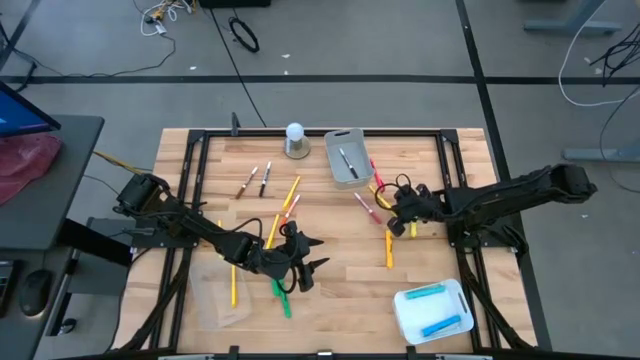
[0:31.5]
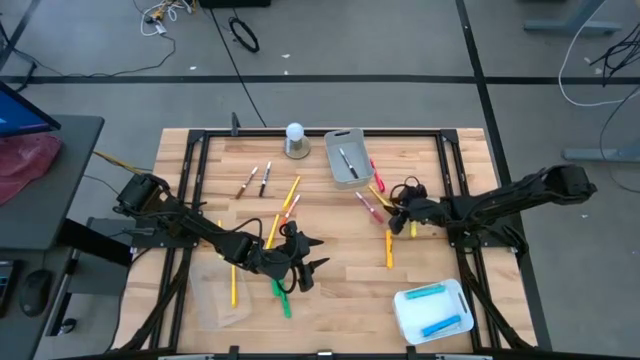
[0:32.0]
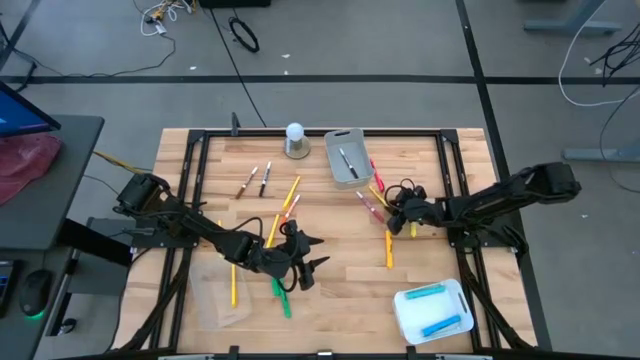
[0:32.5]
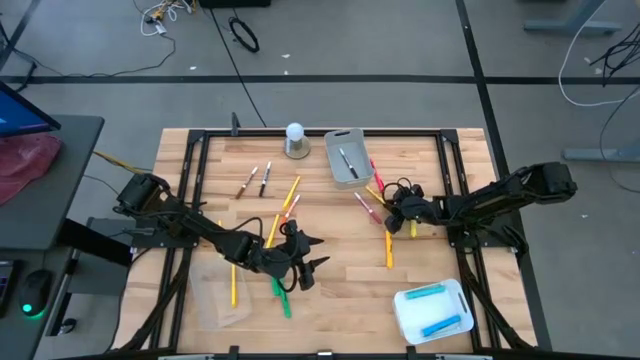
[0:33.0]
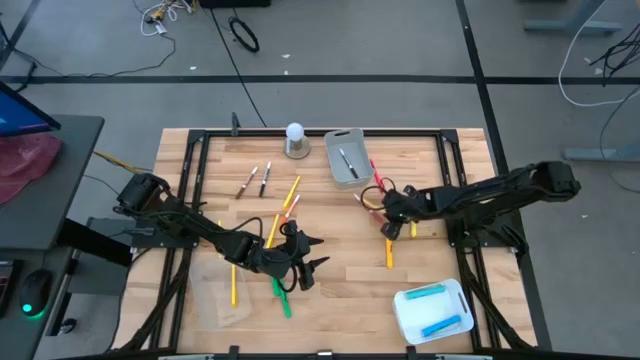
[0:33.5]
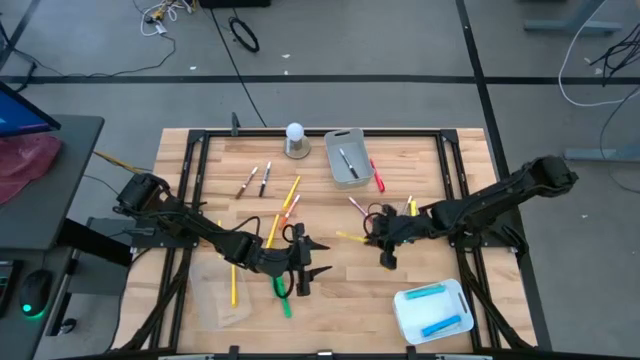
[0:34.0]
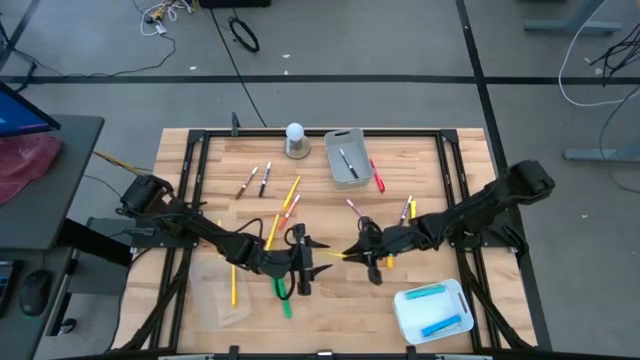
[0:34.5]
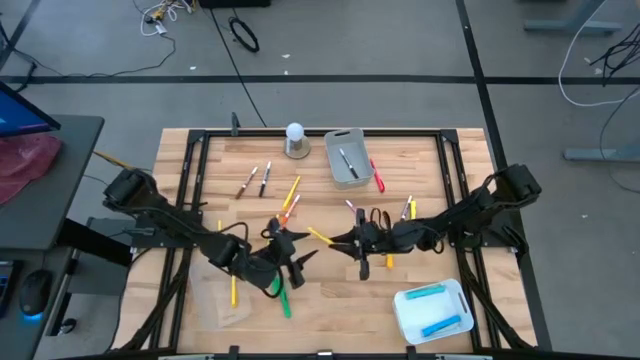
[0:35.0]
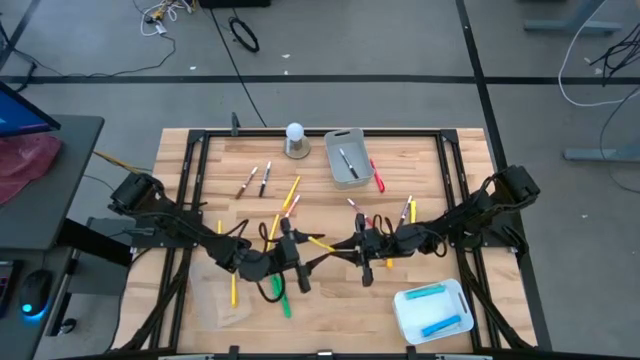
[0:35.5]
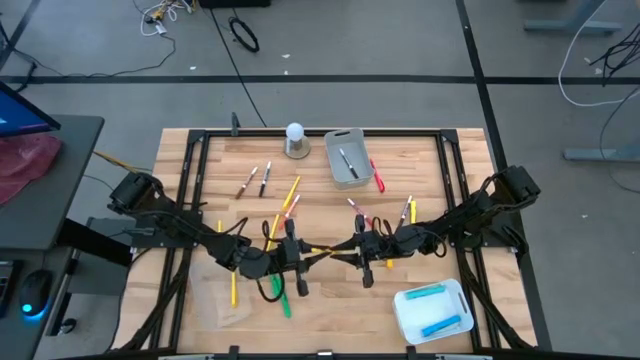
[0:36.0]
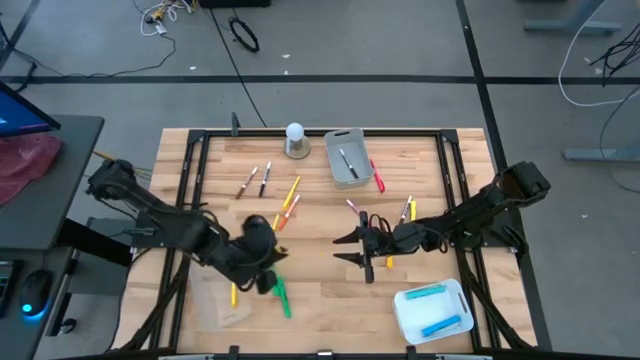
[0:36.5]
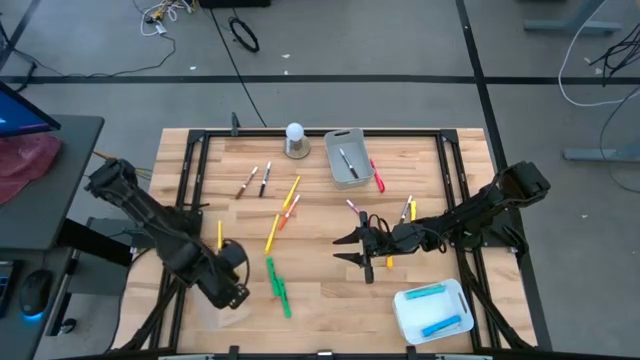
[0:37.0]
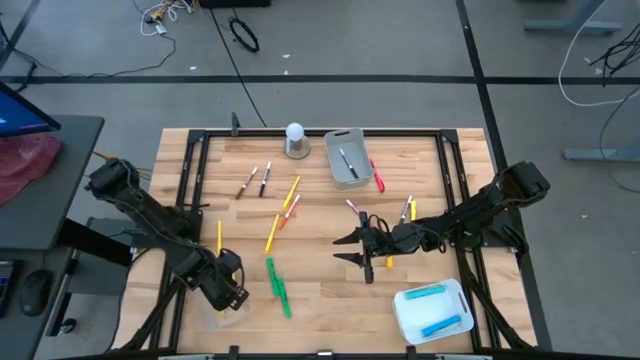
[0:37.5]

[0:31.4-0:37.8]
Task: Pick & Place Markers
Put the yellow pen into the transparent bin

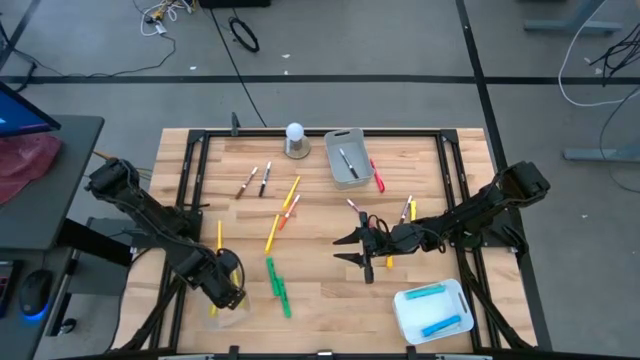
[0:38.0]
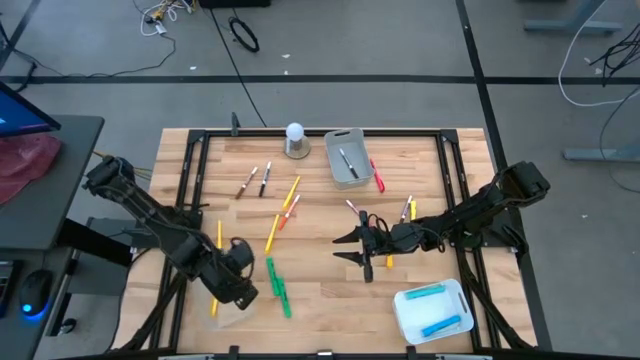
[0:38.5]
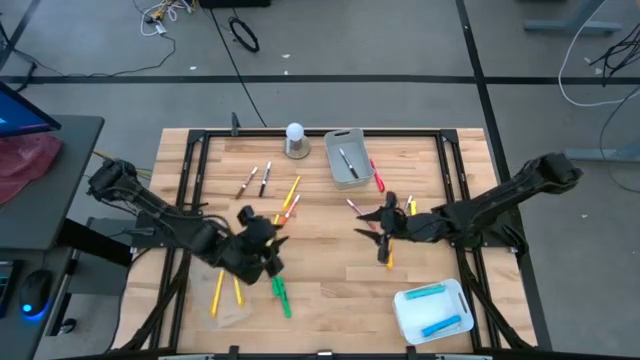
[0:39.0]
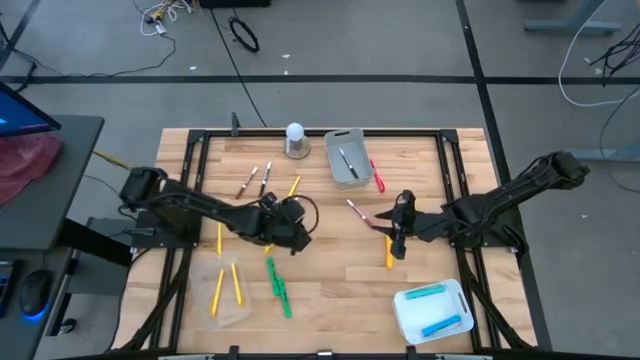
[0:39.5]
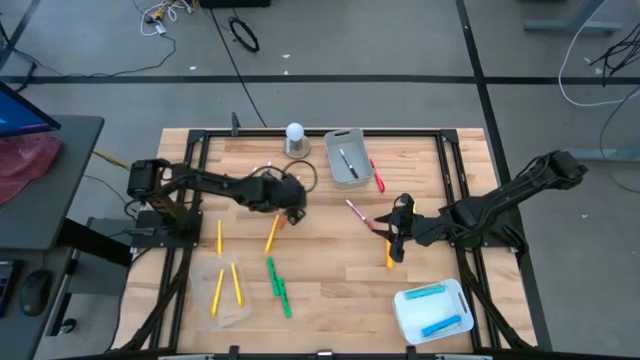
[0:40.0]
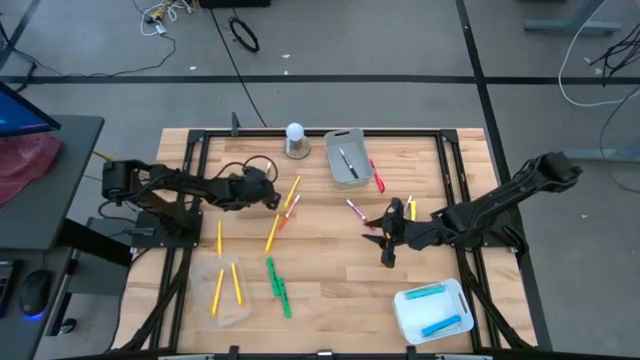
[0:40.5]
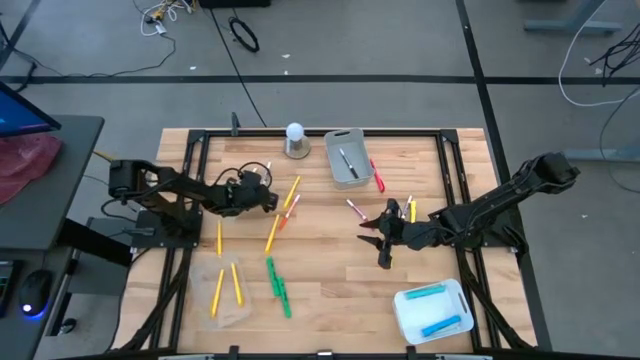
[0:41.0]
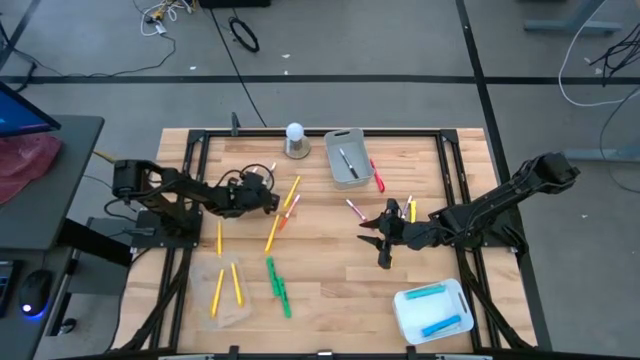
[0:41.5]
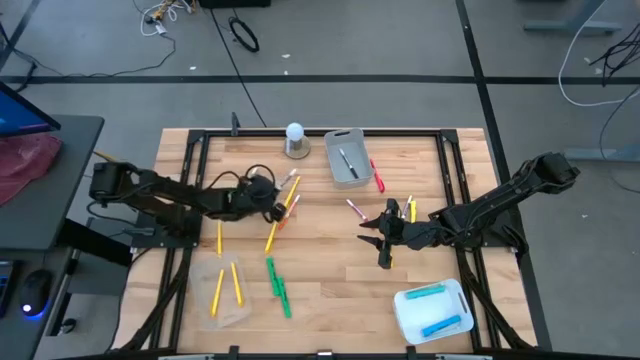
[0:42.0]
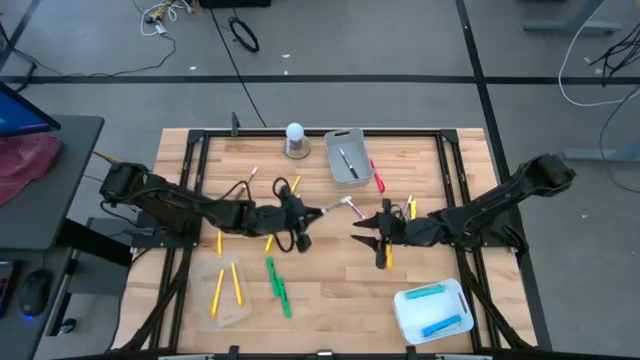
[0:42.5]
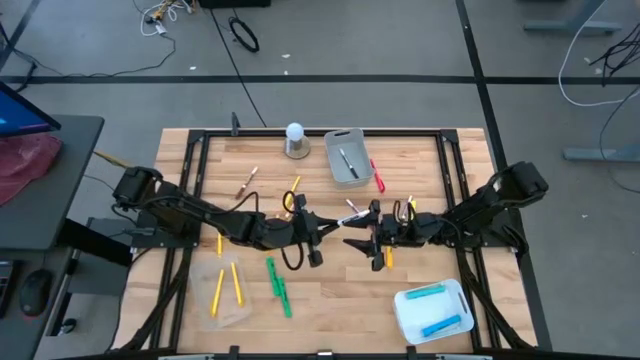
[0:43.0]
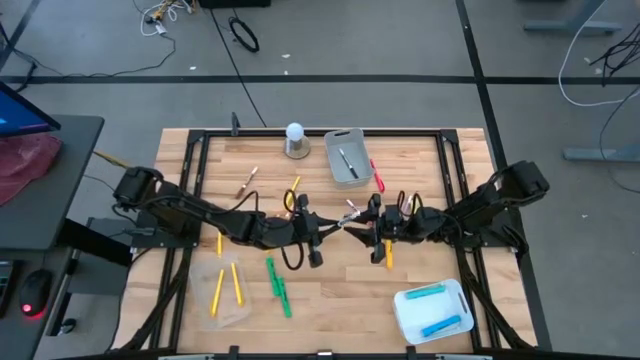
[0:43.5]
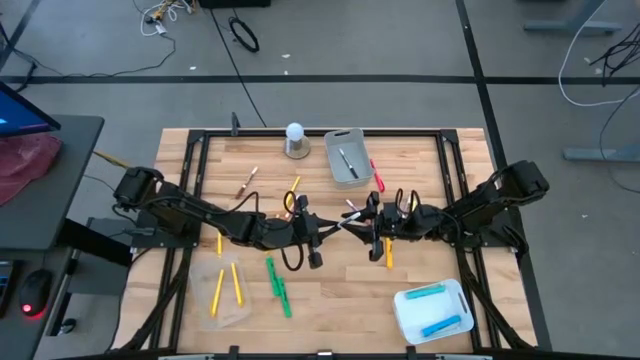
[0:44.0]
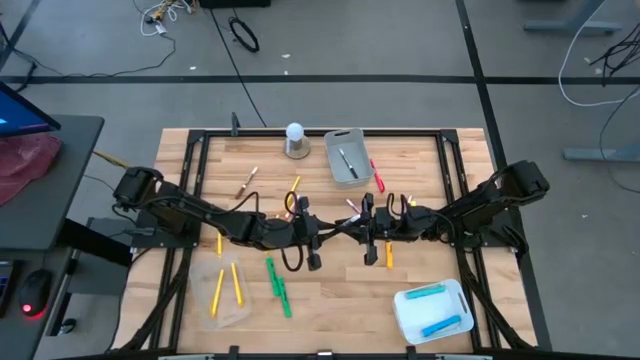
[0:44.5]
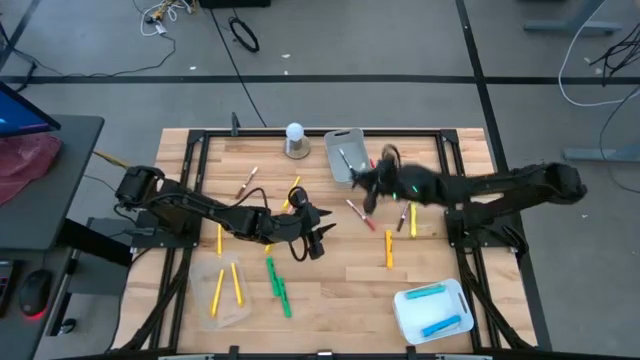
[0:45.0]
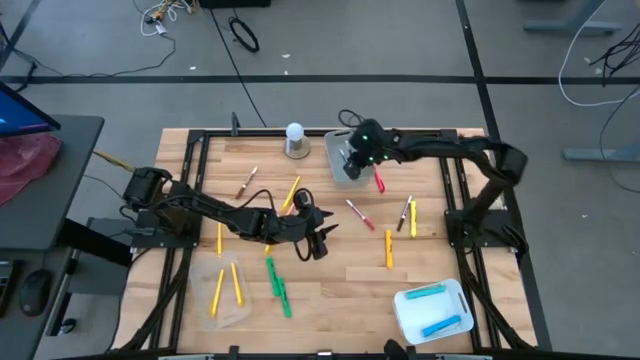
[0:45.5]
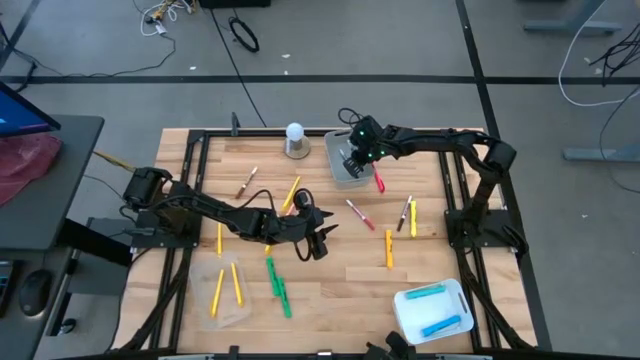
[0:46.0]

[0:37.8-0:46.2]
Put the black marker pen into the gray bin

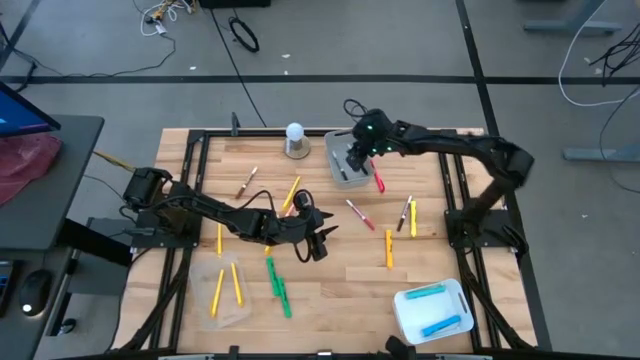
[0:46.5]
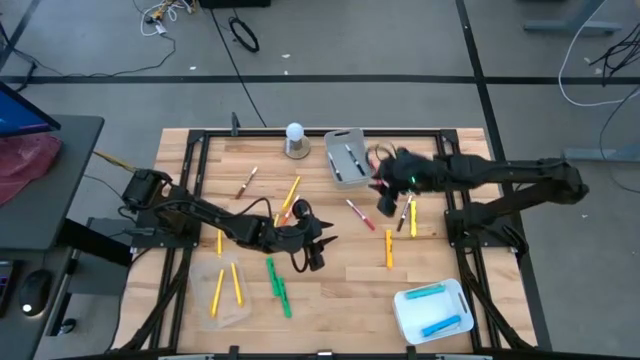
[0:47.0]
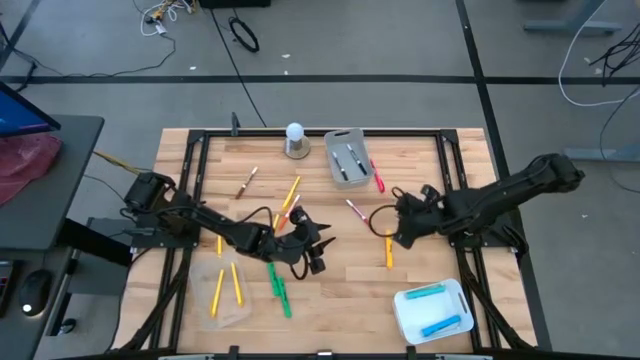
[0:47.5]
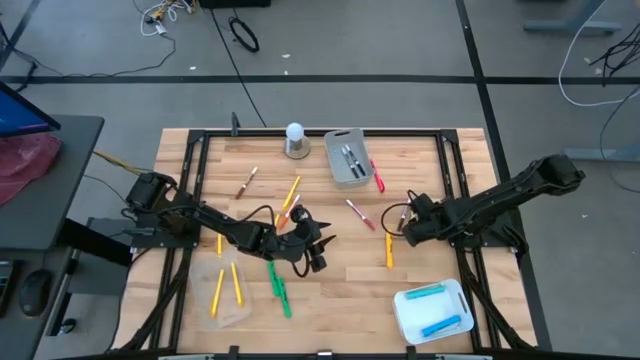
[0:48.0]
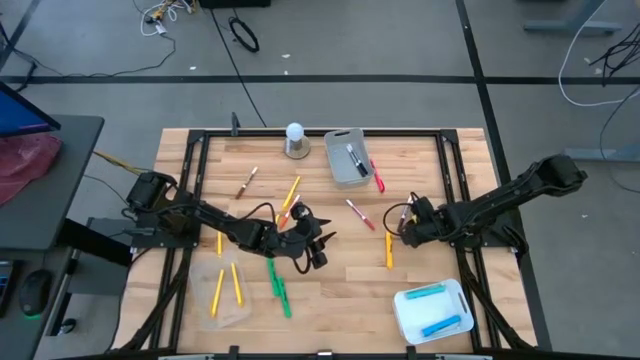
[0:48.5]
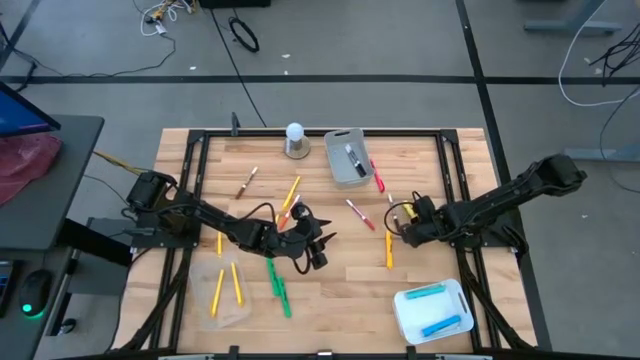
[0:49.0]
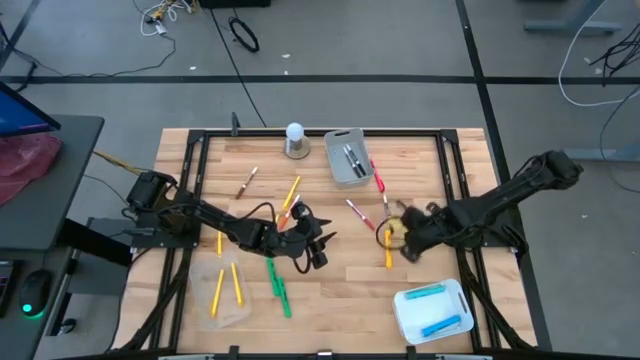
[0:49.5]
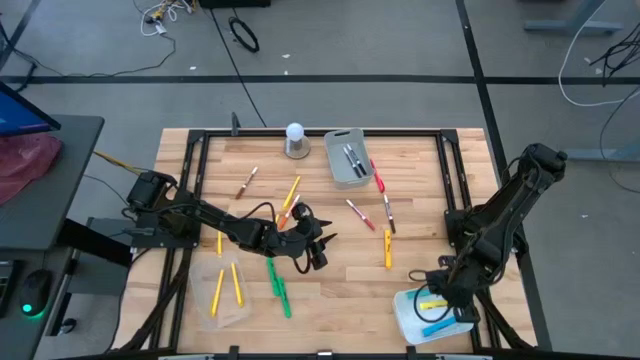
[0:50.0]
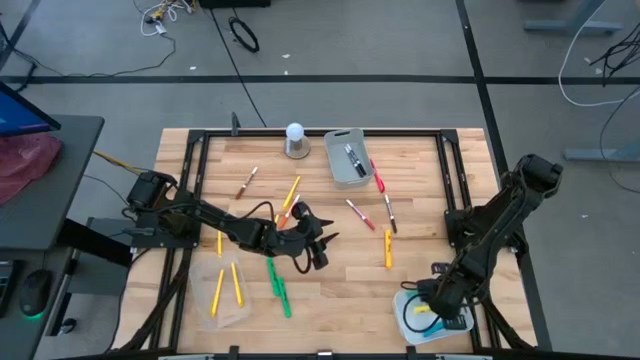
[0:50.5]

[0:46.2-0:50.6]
Put the light yellow highlighter pen into the white bin

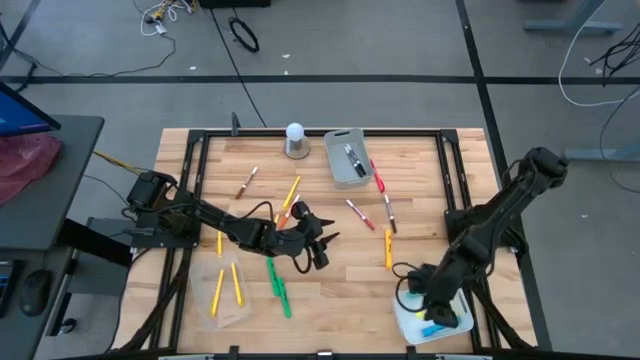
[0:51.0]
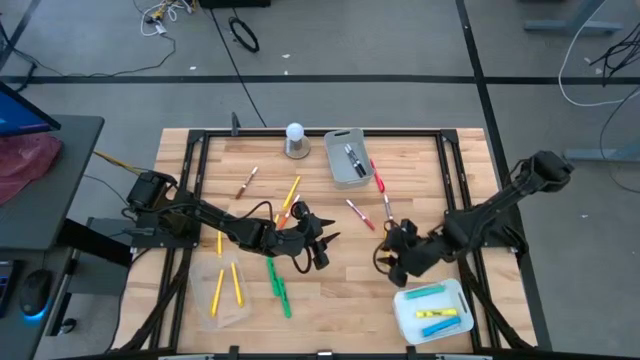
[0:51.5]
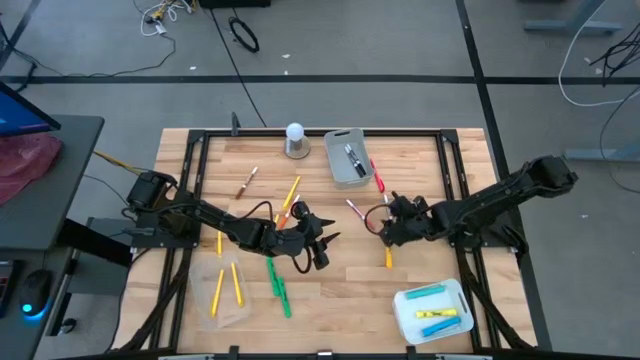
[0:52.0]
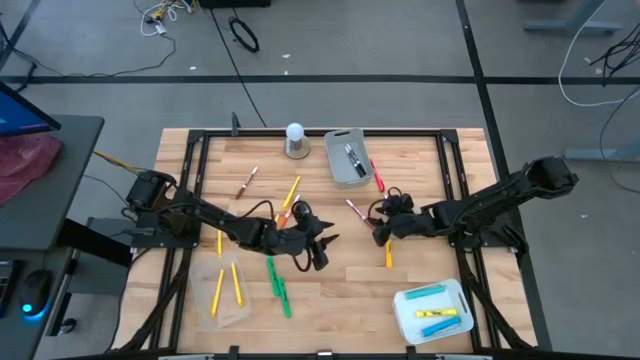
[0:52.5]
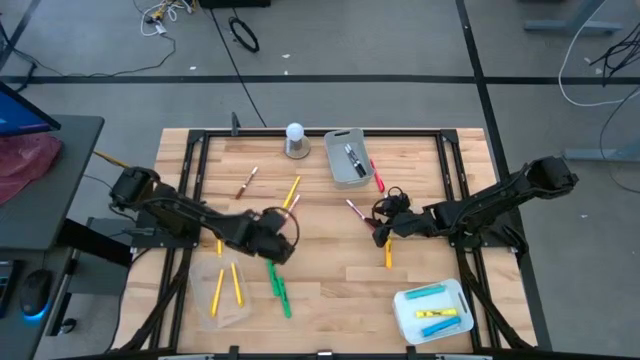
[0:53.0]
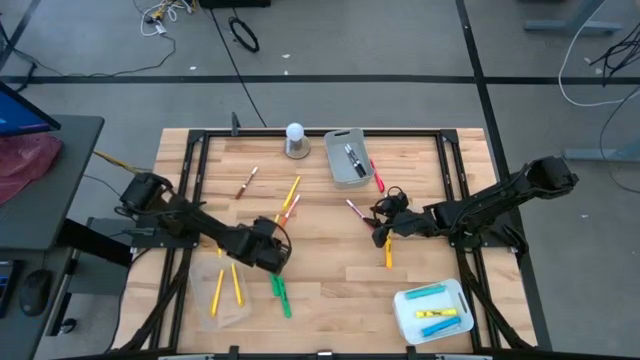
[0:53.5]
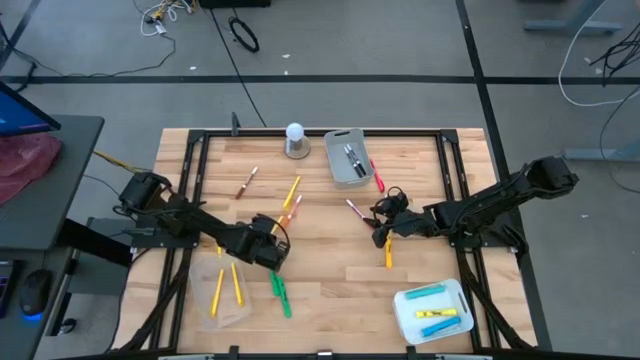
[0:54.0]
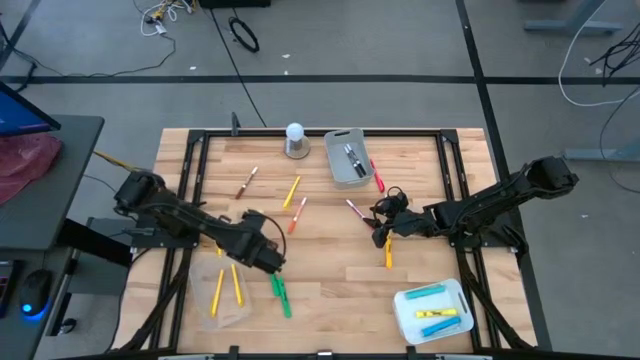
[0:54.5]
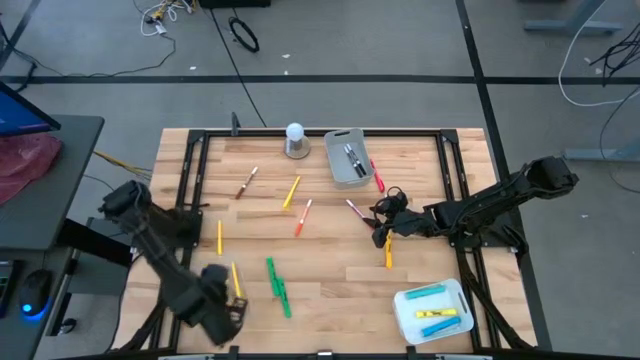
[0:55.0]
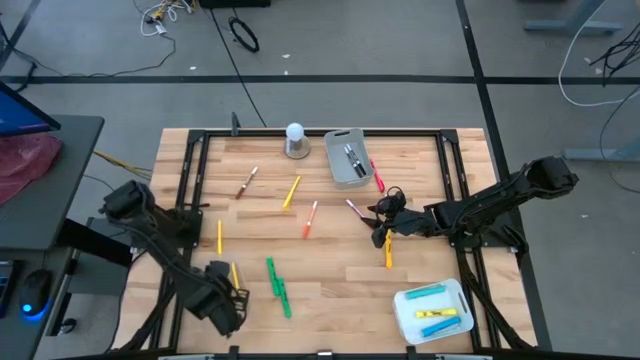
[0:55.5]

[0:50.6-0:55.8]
Put the yellow pen into the transparent bin
